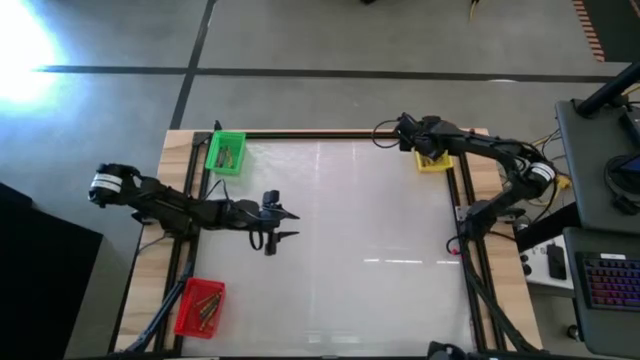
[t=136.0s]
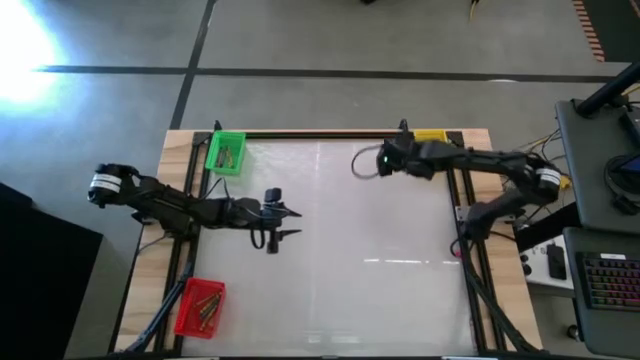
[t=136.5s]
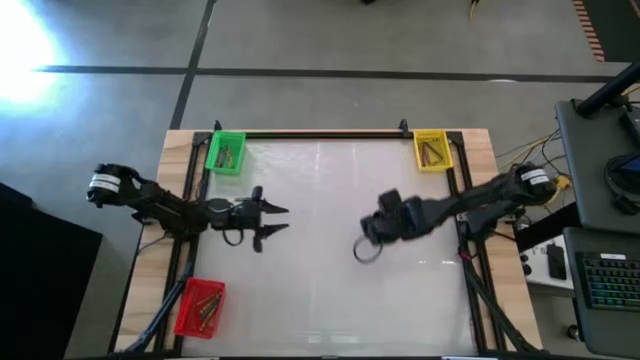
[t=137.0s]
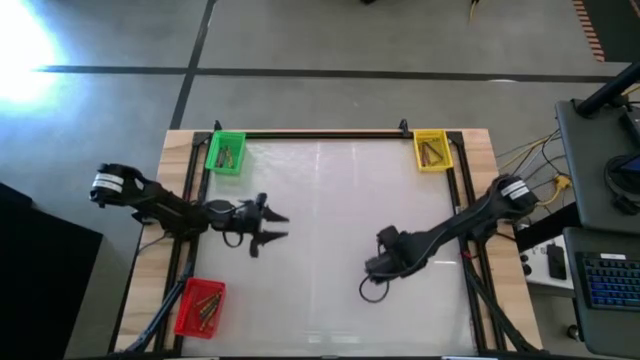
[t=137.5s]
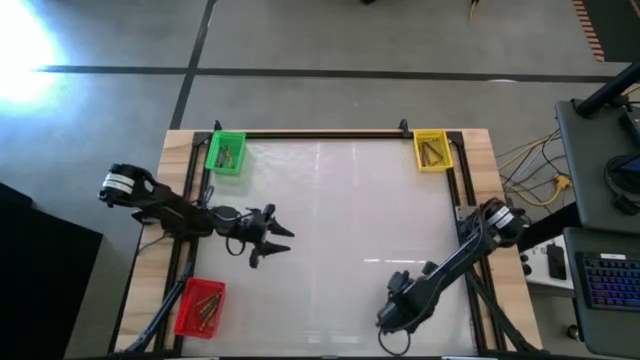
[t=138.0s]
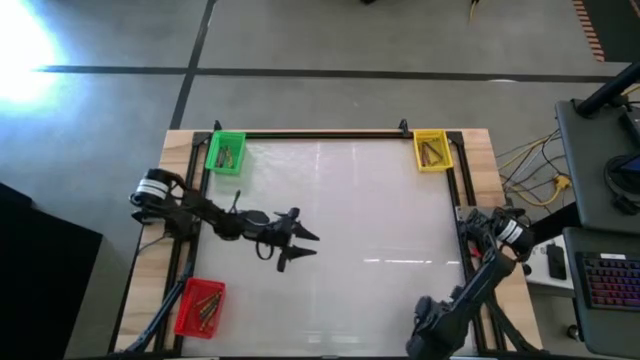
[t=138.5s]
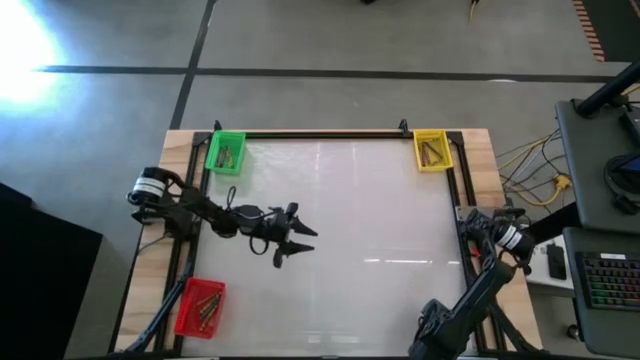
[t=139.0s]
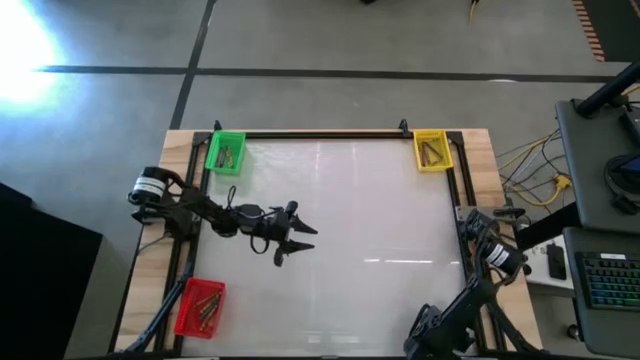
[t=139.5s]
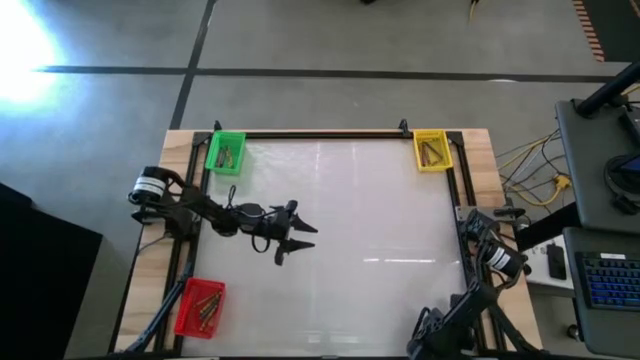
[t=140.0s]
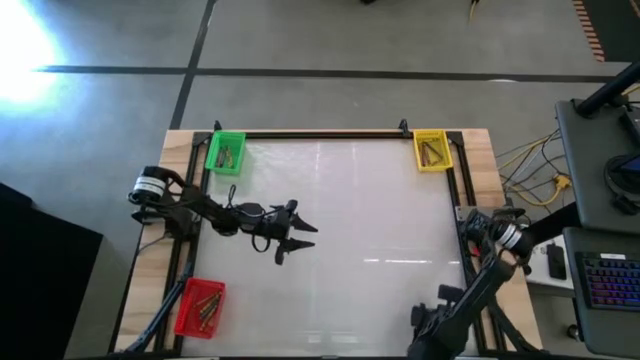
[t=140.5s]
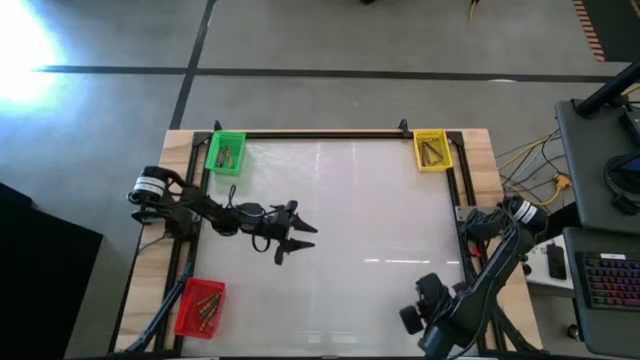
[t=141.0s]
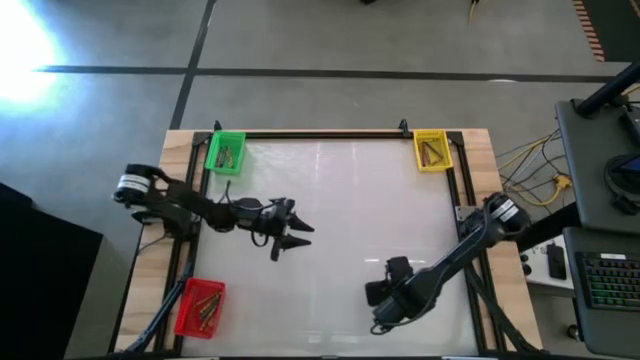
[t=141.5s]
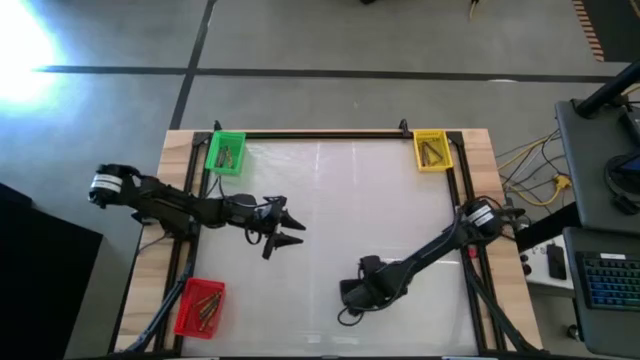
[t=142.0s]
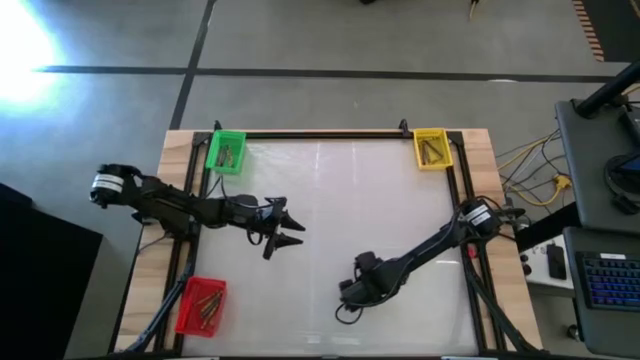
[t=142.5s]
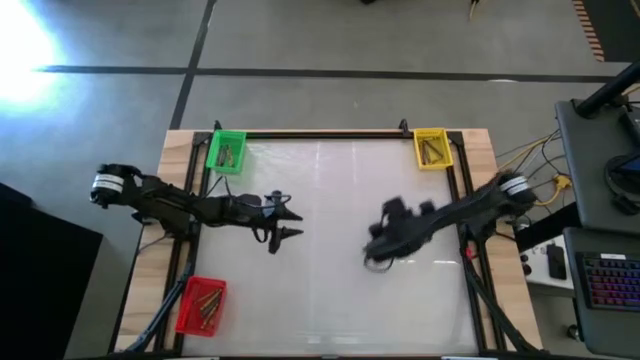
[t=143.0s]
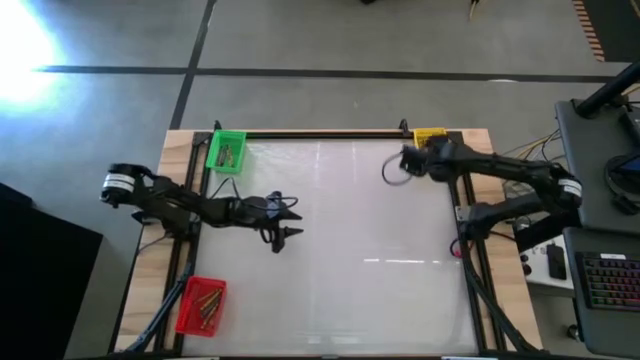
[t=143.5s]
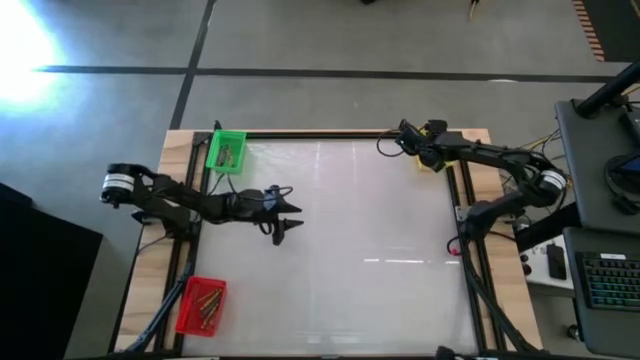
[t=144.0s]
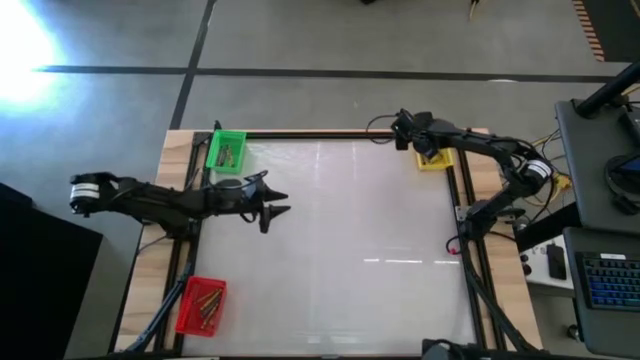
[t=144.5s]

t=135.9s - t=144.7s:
Task: Sort crayons
Put the brown crayon into the yellow basket

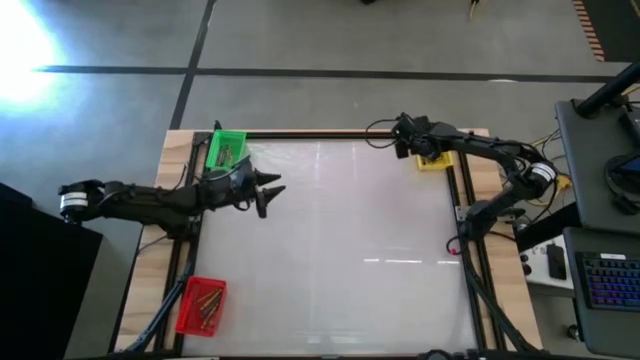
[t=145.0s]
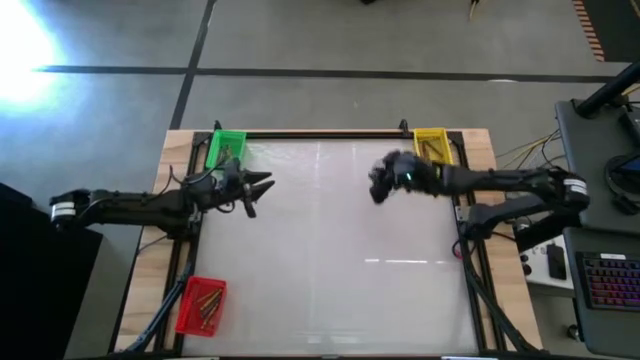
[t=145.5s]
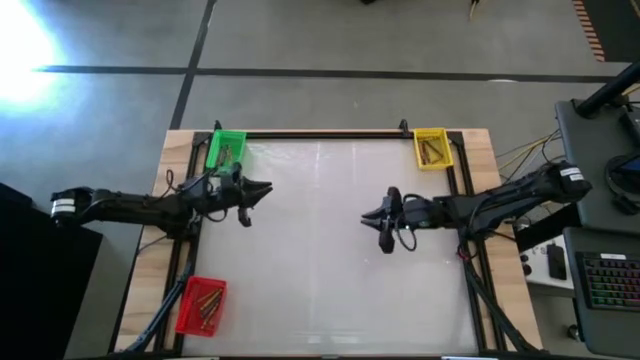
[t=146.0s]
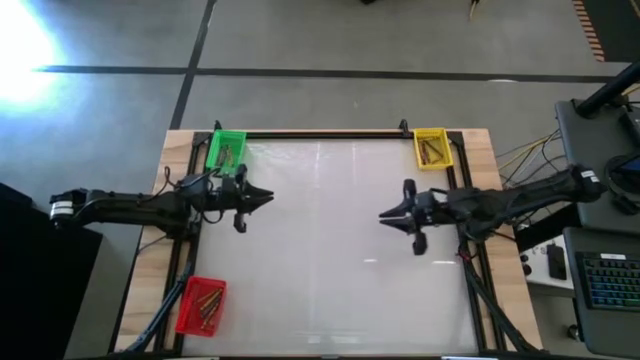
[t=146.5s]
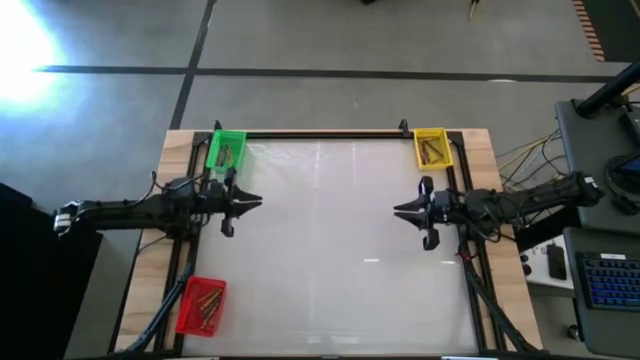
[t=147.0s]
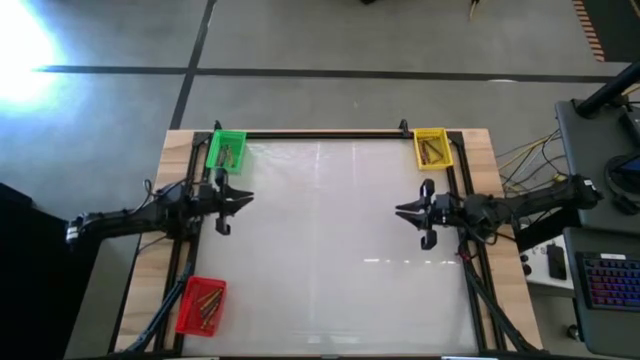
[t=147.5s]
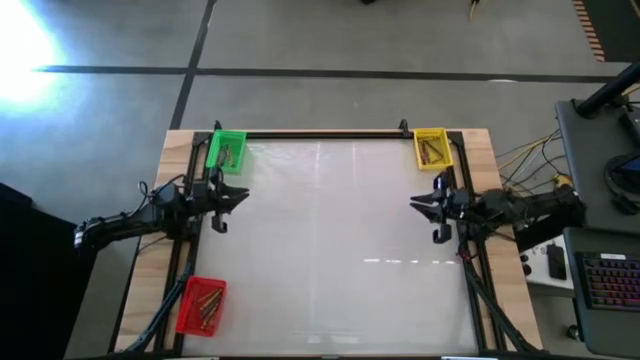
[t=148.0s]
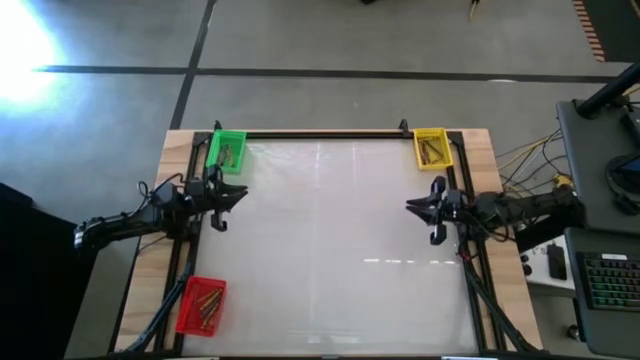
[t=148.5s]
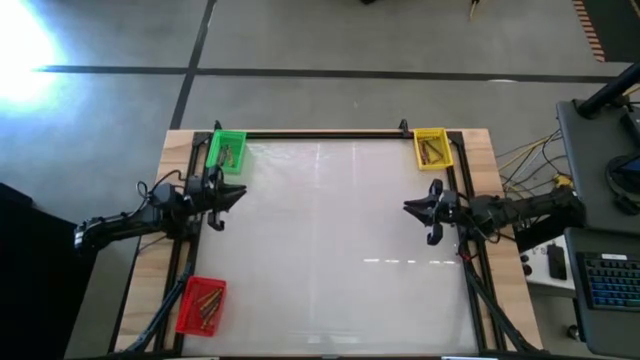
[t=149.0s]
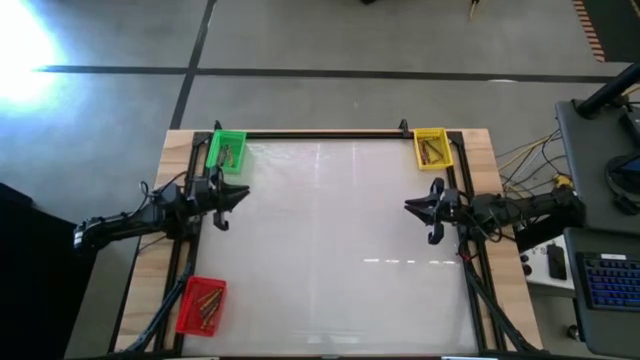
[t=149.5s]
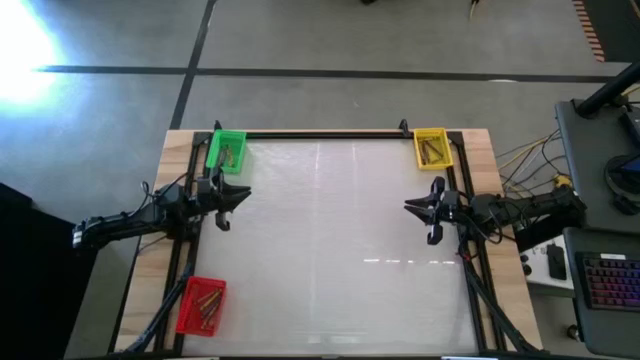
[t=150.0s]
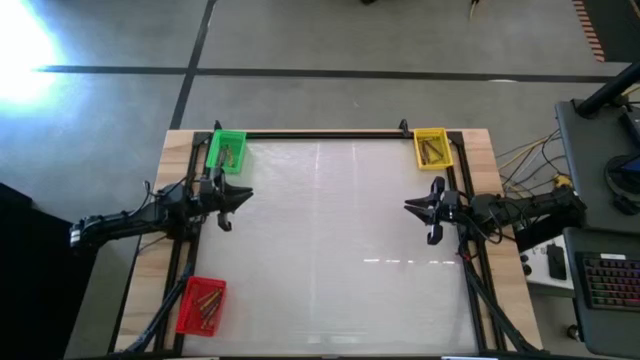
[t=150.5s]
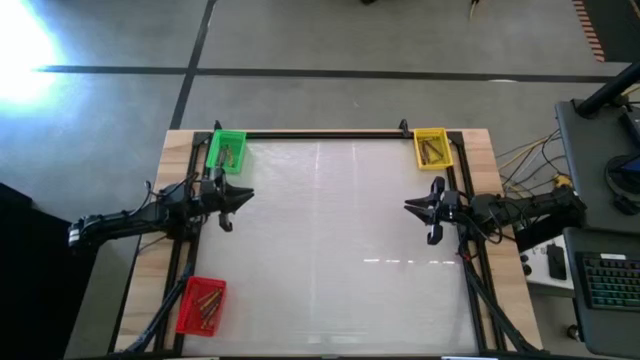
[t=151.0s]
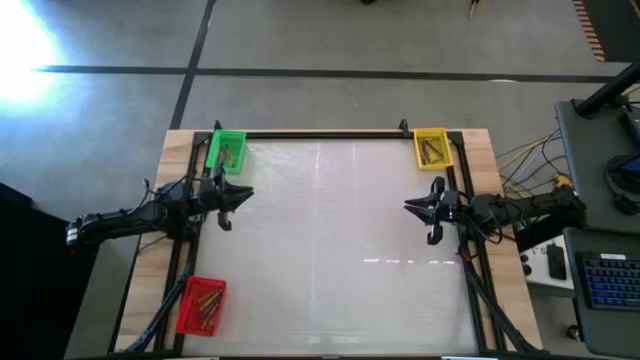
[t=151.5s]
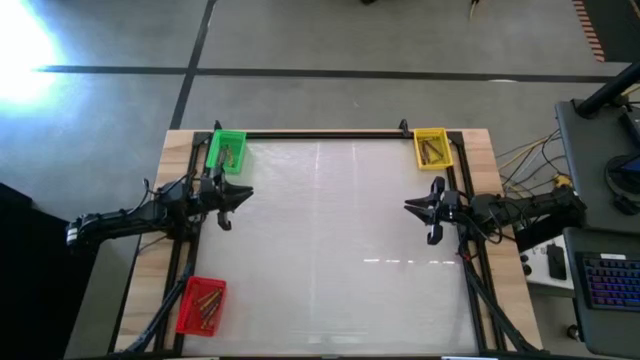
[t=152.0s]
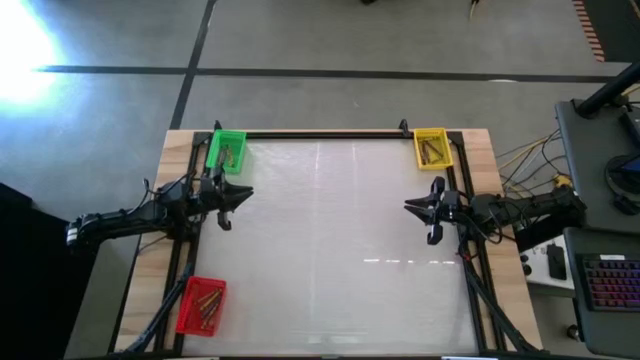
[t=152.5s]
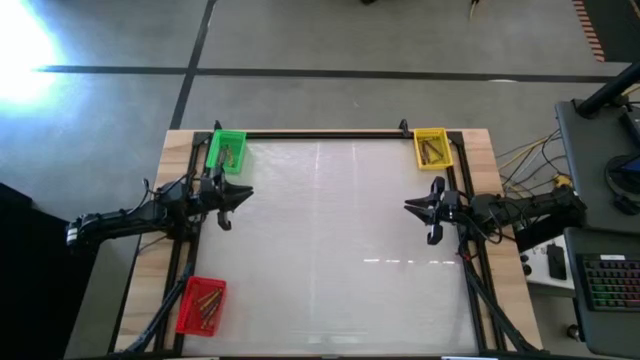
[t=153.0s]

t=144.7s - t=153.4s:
Return to Home Position
